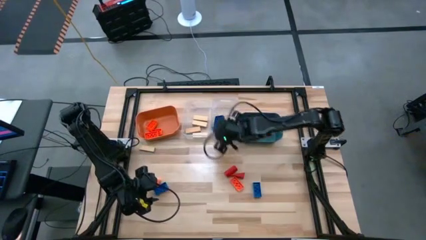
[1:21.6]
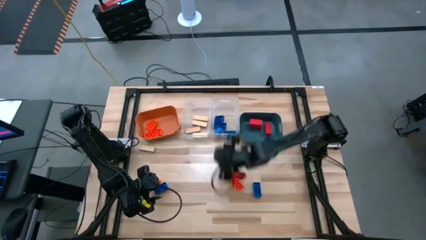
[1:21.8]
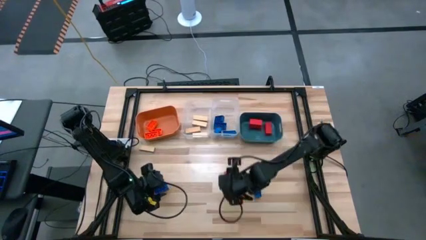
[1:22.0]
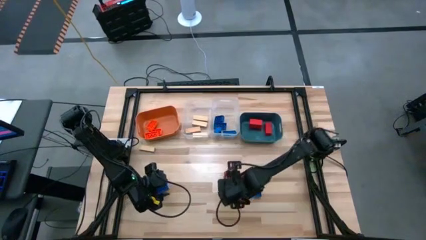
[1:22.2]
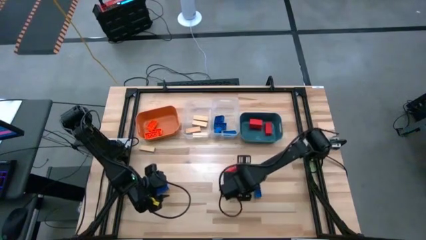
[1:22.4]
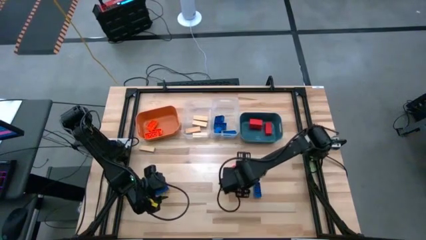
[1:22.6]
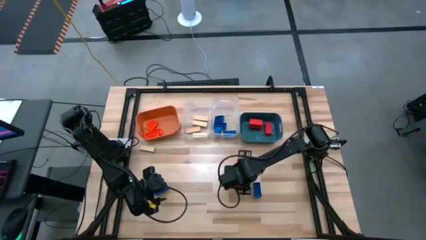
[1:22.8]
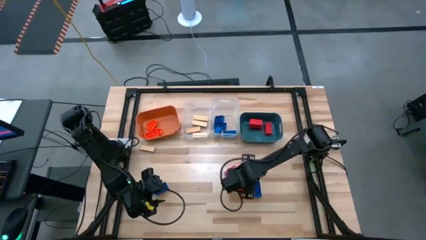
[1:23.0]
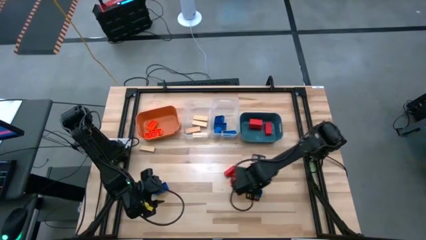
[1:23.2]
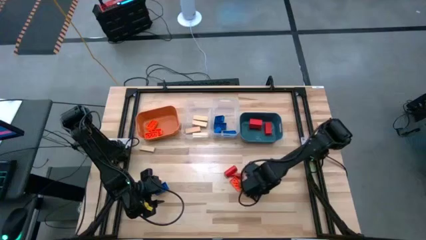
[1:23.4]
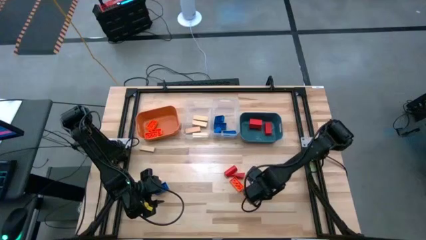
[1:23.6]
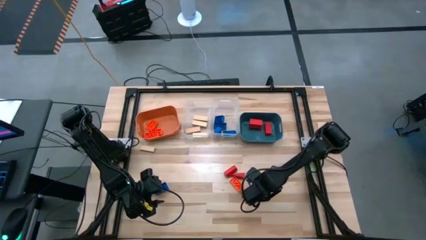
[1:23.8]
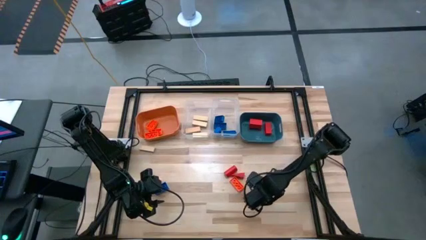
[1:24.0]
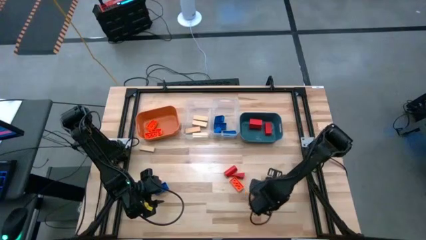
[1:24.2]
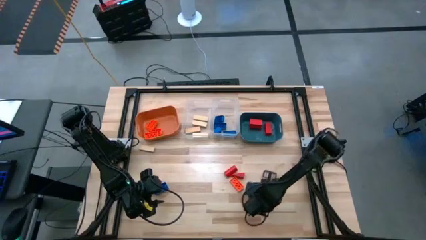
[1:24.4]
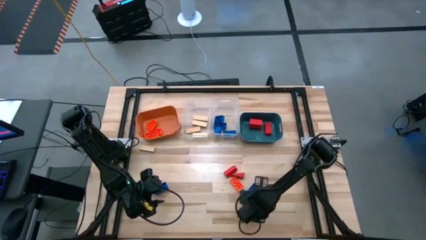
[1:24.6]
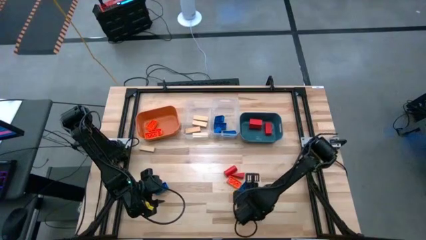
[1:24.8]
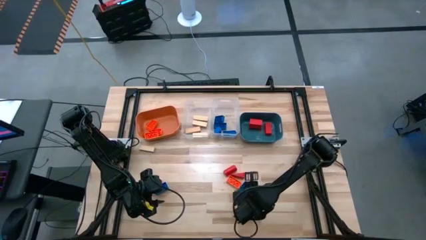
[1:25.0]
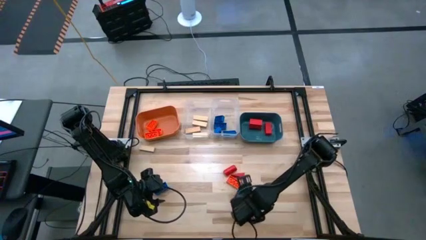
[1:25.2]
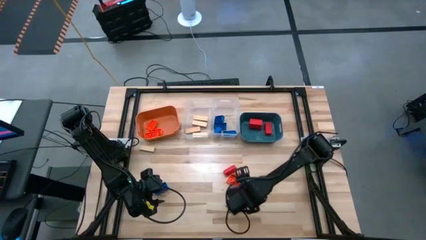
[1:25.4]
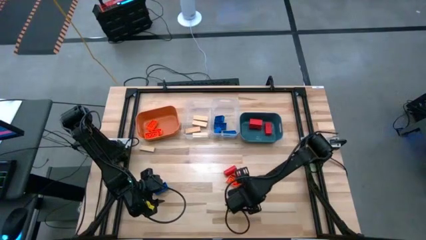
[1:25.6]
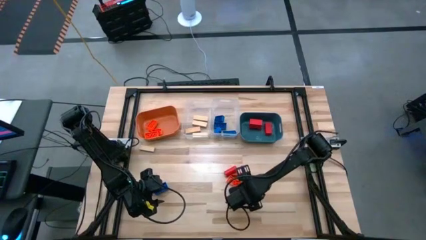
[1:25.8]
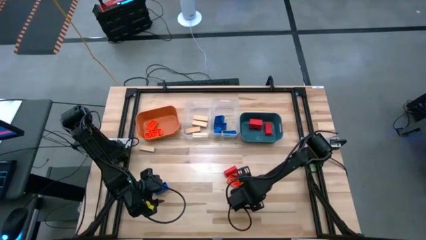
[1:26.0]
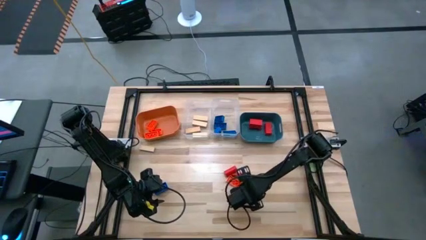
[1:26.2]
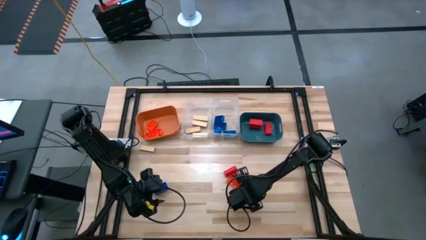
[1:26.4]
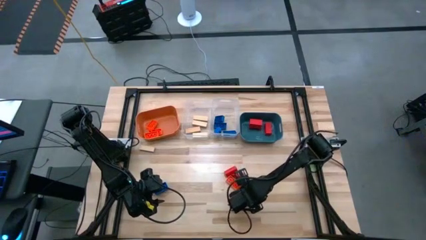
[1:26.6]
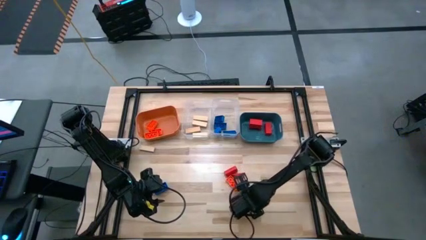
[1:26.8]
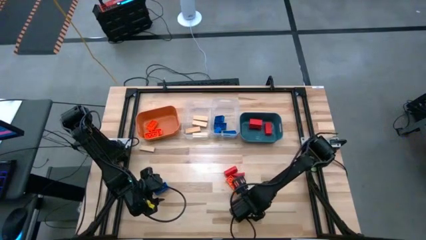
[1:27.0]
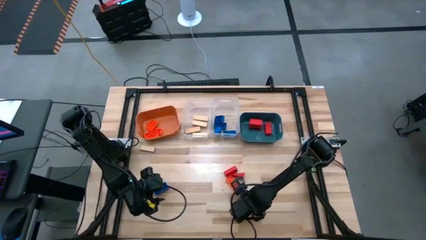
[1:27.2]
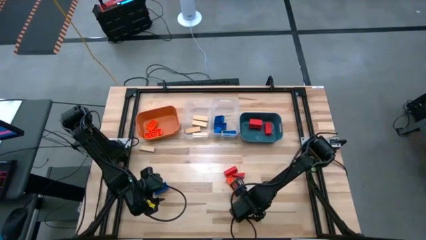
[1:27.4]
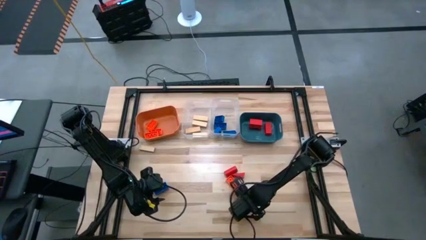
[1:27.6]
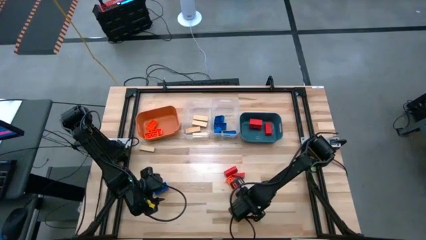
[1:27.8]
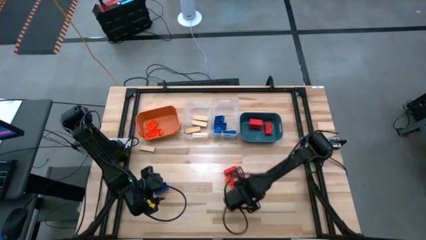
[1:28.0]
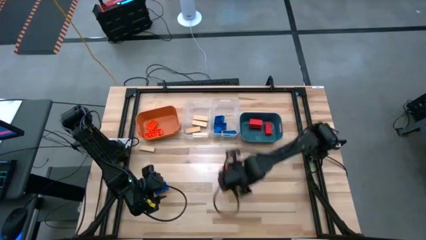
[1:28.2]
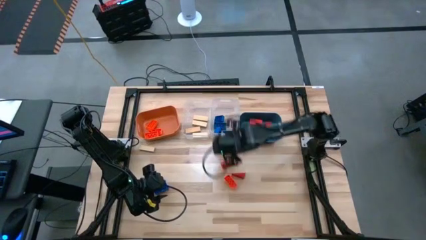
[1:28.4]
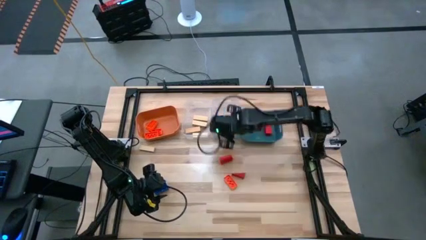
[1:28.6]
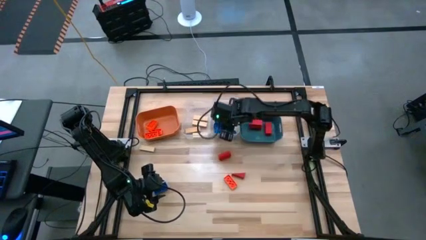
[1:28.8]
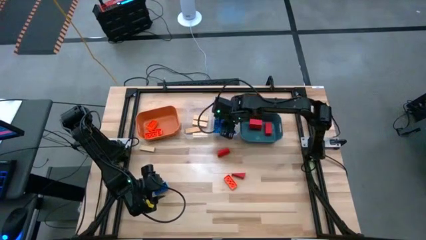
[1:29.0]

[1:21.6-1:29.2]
Task: Sort blocks
Put the orange game piece into the right transparent bin

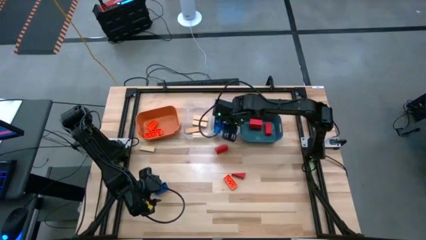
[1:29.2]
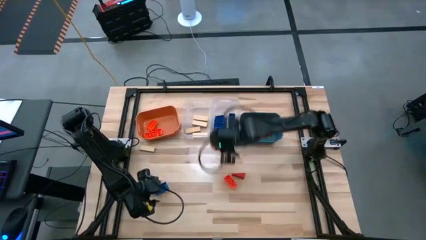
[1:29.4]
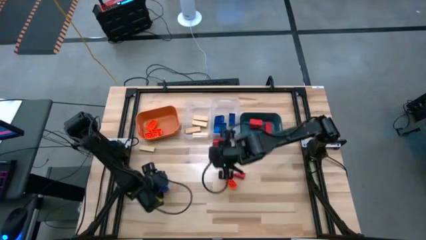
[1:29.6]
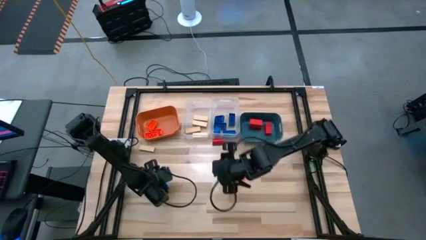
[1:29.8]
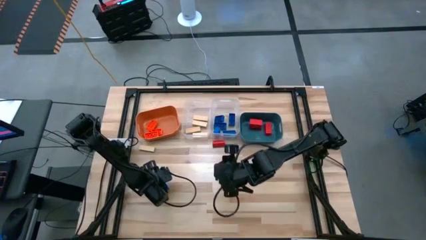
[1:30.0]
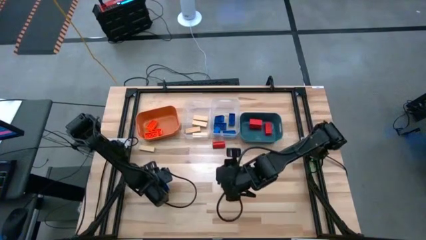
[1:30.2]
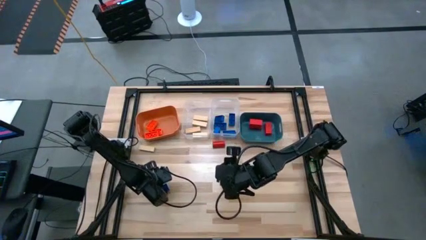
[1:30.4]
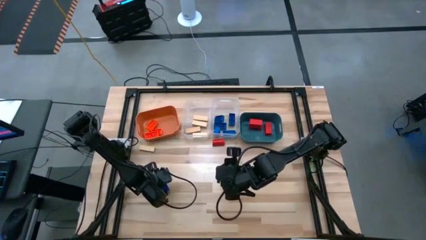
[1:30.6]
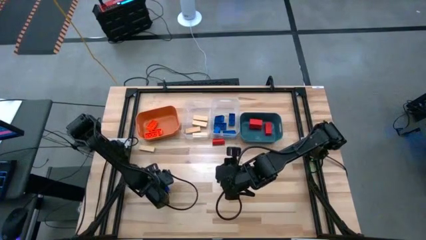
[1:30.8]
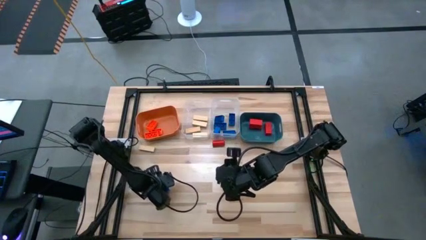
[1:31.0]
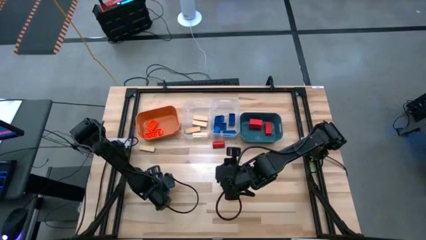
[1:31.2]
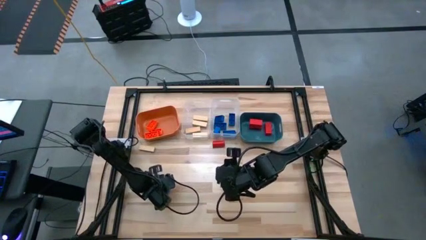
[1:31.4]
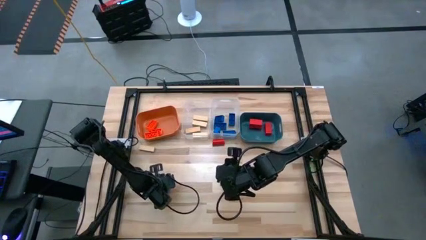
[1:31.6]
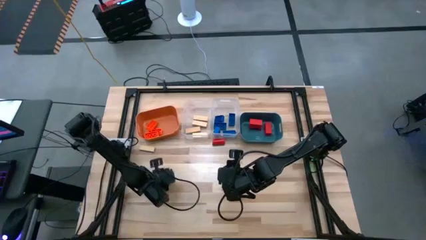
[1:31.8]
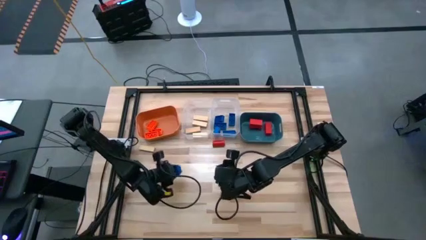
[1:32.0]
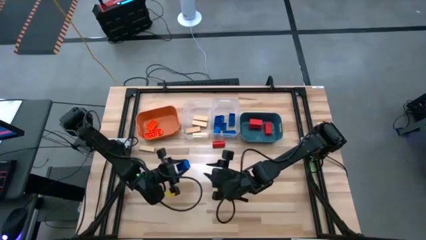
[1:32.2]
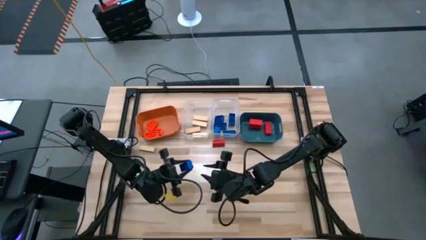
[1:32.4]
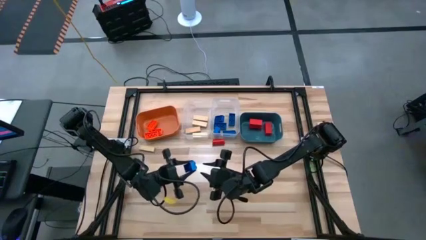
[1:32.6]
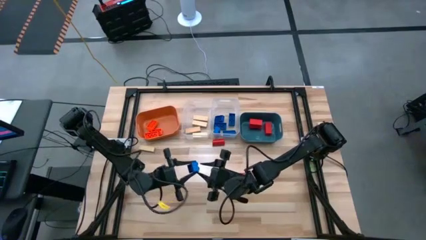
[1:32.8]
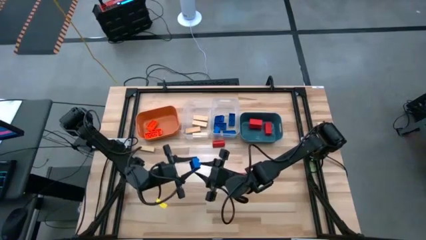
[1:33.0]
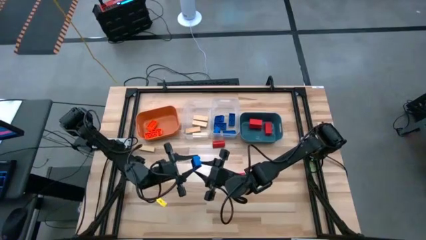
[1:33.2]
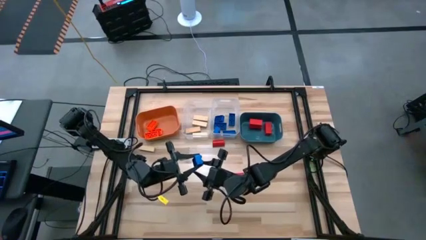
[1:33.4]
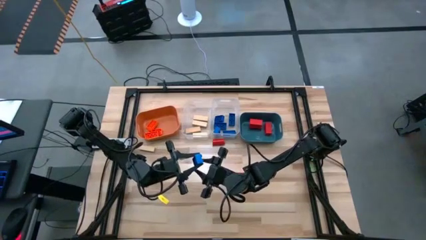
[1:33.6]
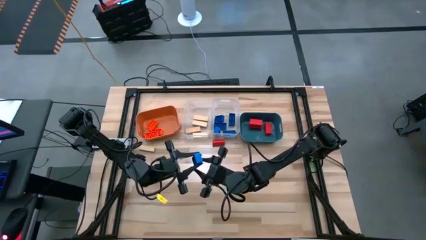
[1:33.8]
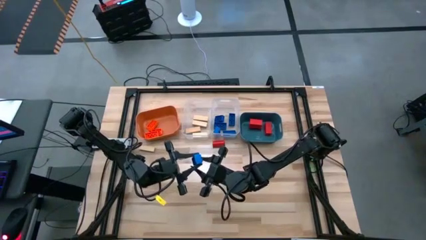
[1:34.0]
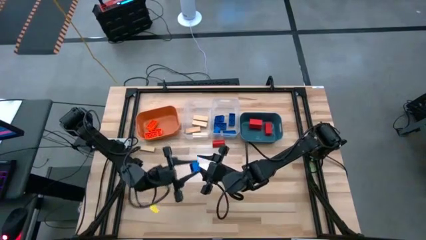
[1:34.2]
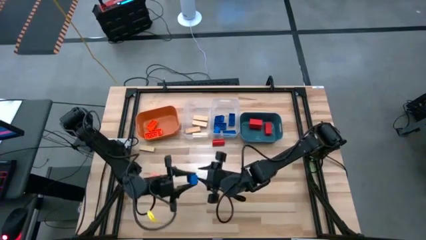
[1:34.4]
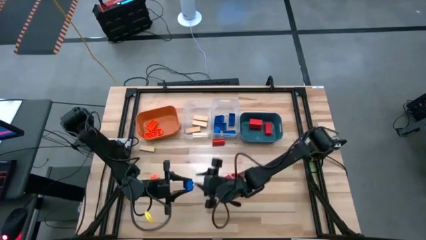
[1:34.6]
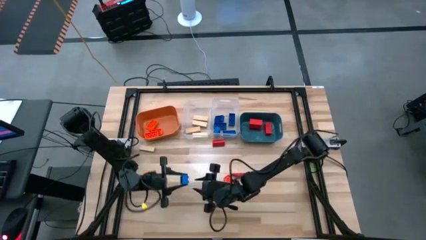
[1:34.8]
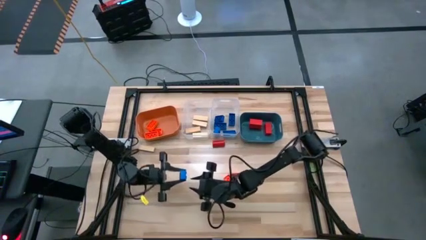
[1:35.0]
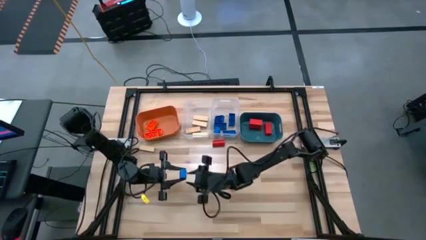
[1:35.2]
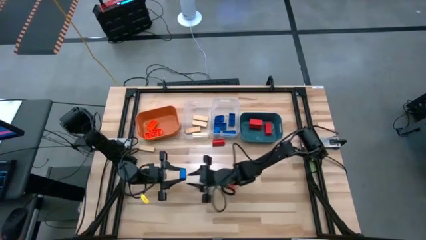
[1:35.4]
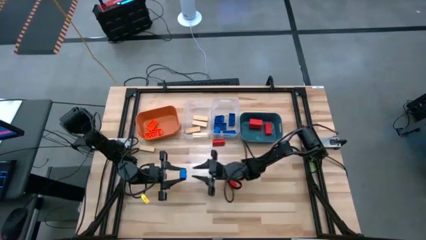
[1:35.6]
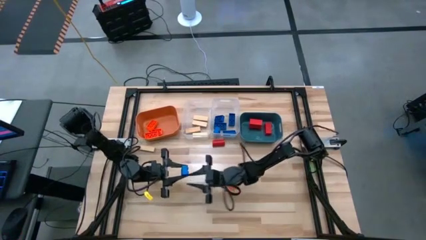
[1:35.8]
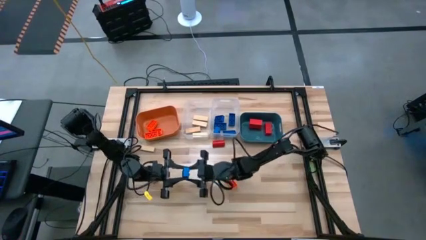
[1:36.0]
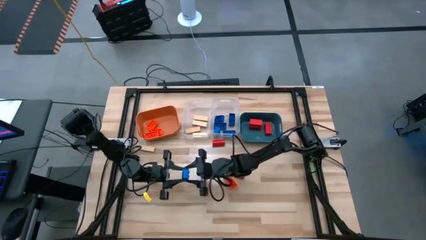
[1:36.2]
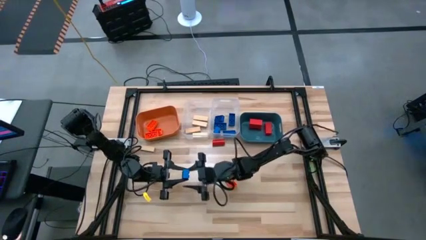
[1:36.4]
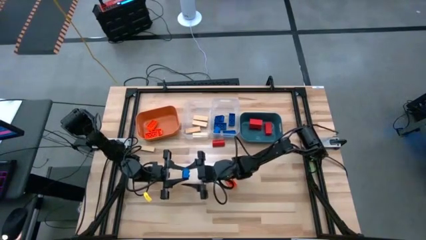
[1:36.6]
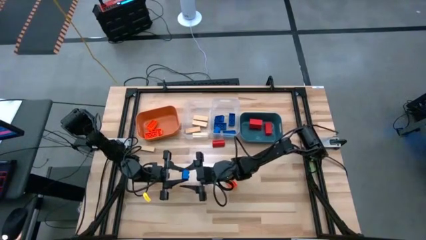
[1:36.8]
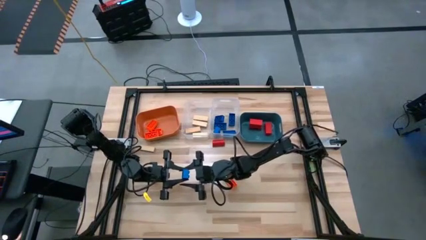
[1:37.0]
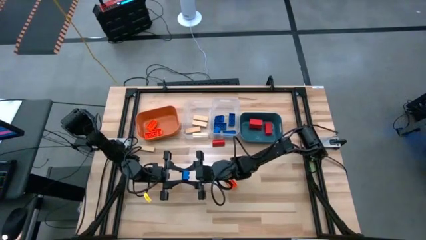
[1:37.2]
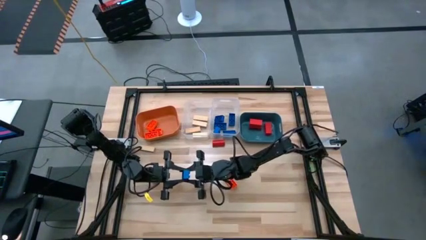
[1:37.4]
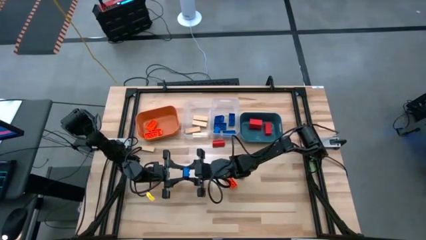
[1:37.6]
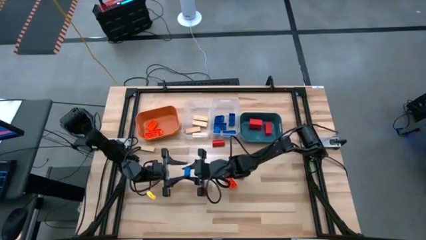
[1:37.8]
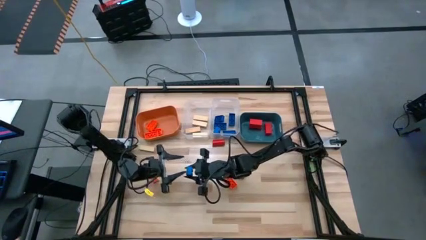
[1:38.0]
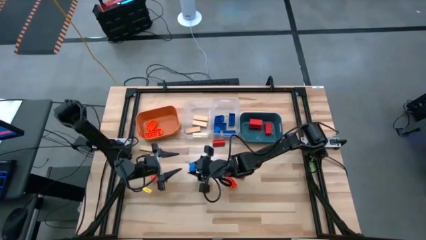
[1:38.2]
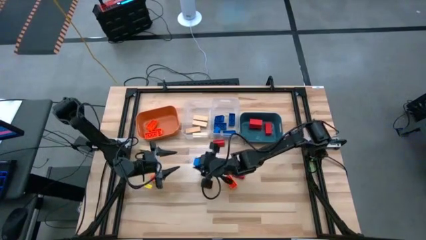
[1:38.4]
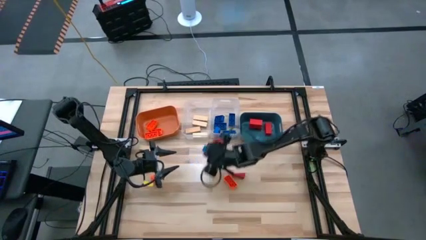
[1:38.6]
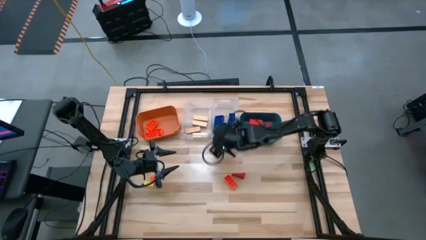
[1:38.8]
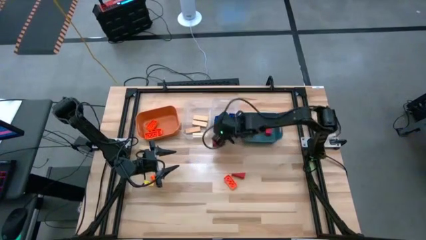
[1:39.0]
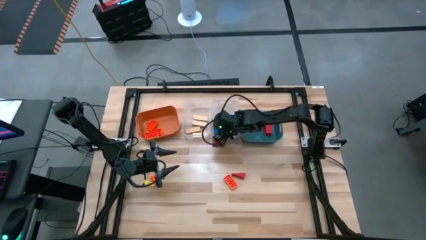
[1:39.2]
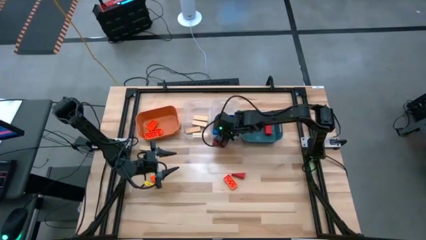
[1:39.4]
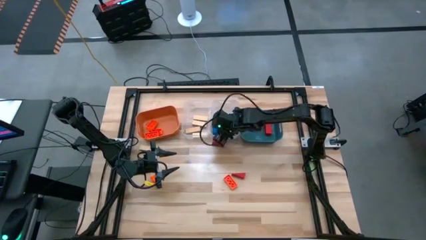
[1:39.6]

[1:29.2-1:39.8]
Put the blue game piece into the right transparent bin
